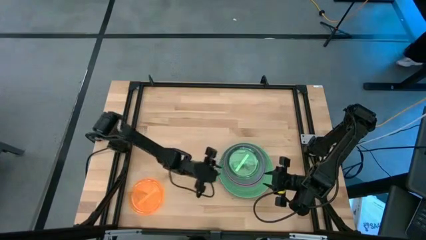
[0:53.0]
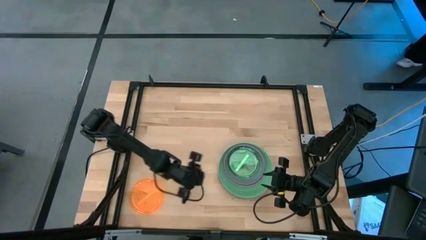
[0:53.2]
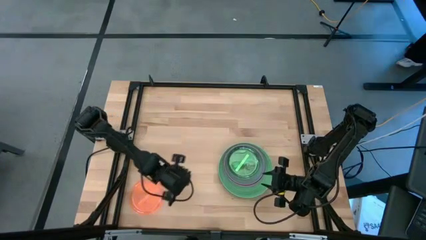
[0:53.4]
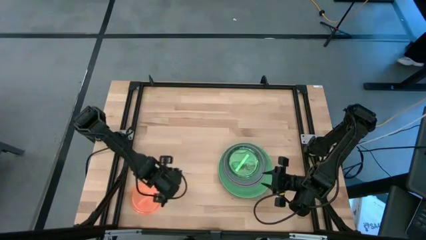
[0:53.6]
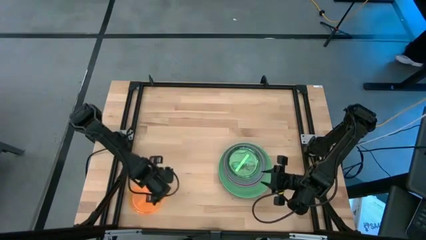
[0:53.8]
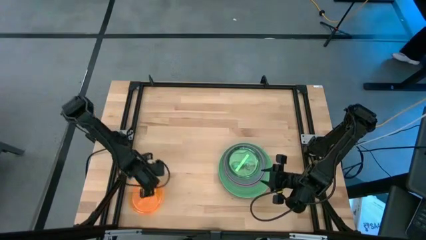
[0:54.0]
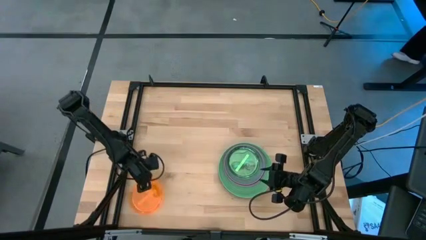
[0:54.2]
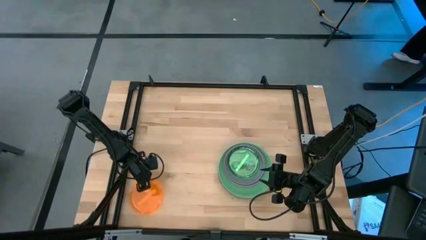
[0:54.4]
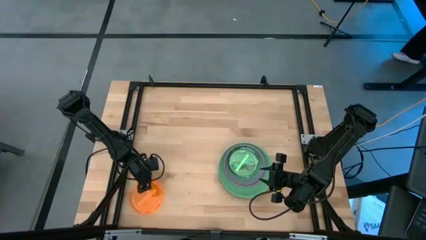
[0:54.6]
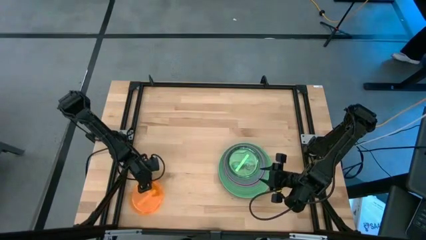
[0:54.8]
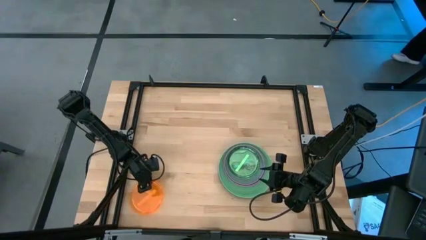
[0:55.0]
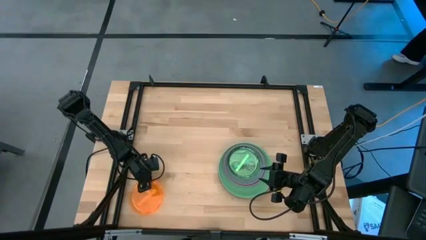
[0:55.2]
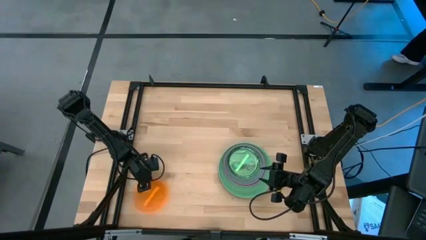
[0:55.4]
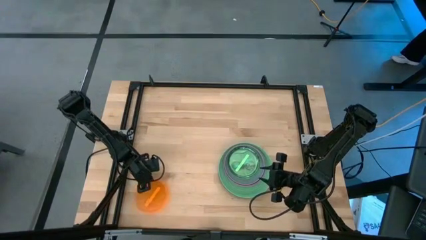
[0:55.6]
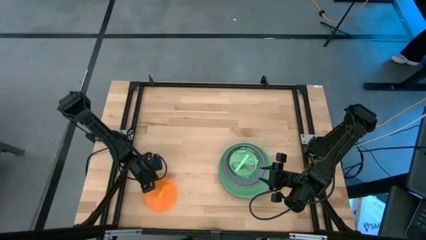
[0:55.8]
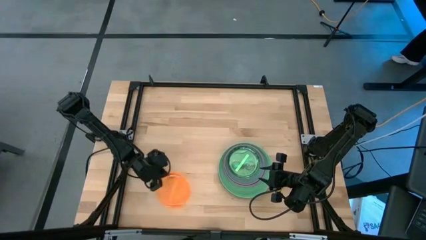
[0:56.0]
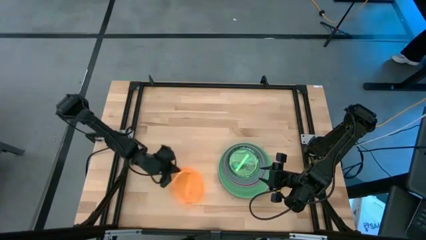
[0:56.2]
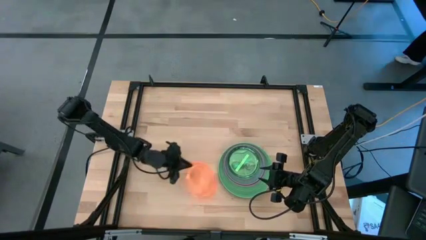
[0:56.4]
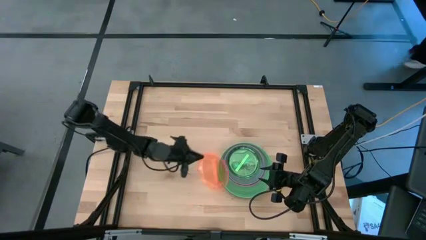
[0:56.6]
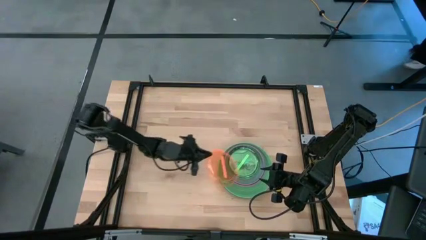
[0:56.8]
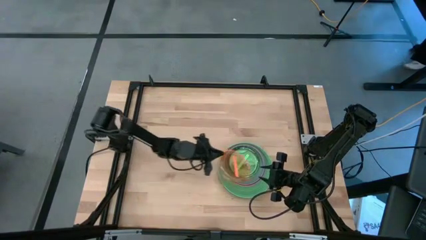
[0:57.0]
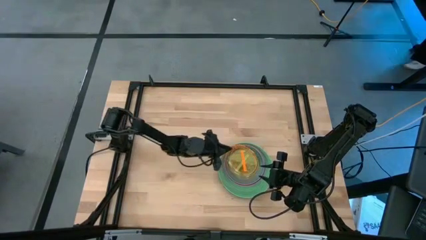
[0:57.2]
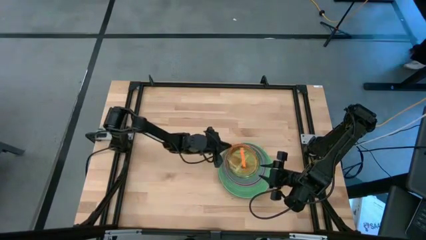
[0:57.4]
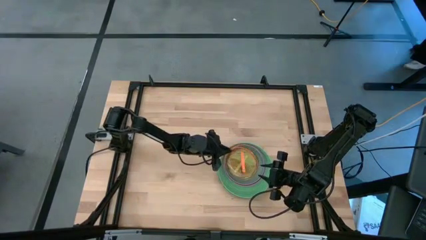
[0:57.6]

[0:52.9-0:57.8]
Task: Stack plastic plates
Stack the light orange plate on the light green plate

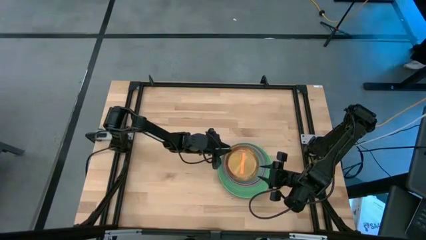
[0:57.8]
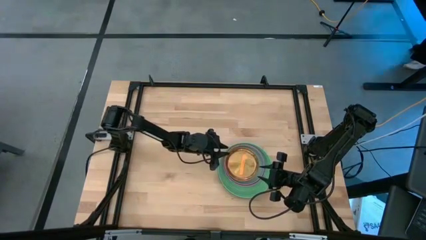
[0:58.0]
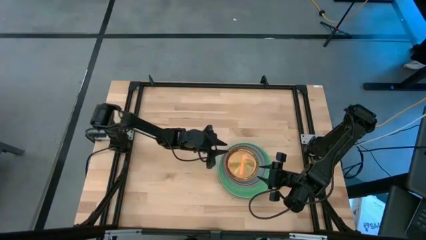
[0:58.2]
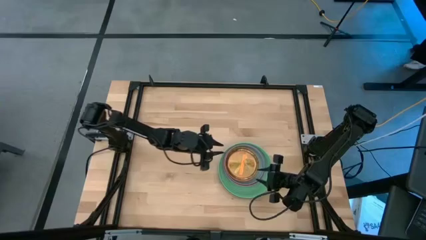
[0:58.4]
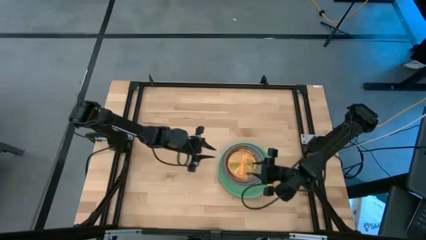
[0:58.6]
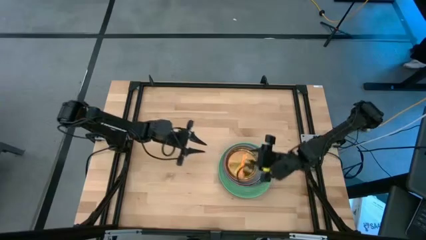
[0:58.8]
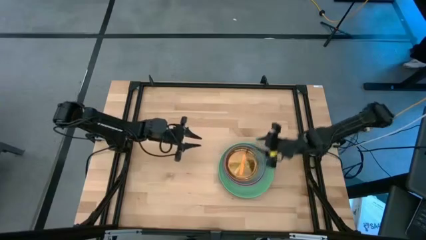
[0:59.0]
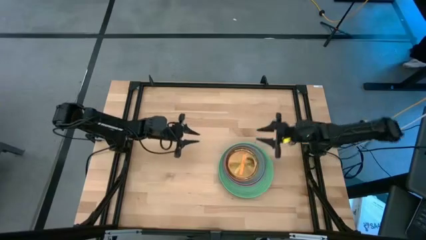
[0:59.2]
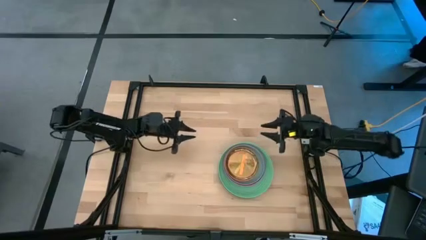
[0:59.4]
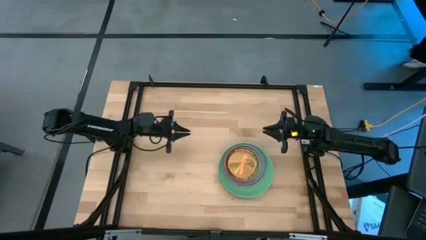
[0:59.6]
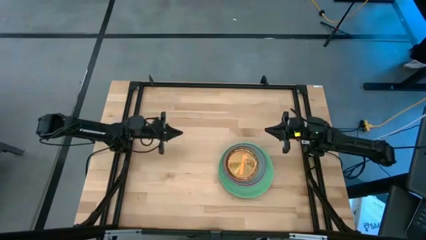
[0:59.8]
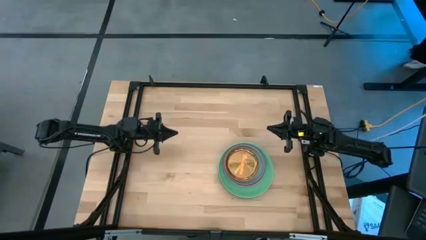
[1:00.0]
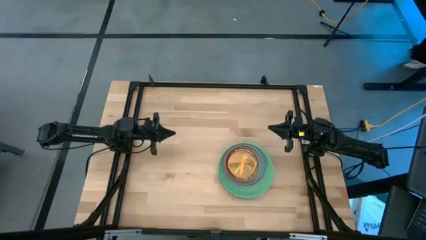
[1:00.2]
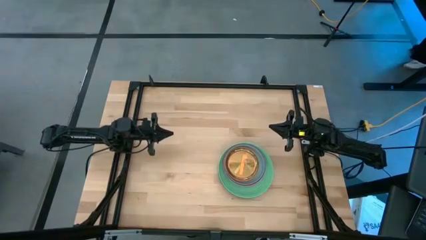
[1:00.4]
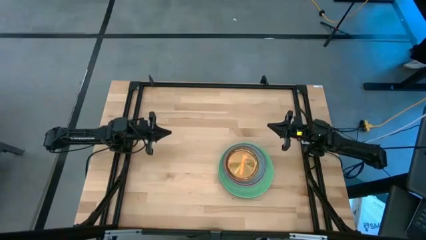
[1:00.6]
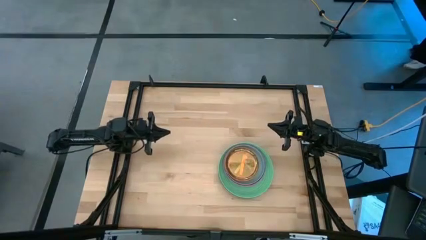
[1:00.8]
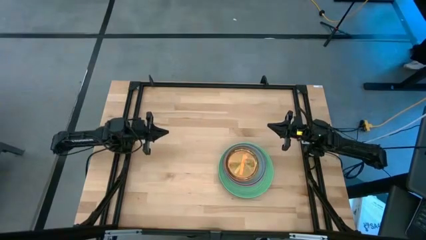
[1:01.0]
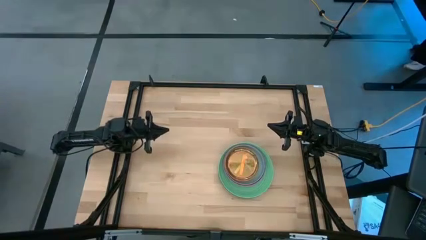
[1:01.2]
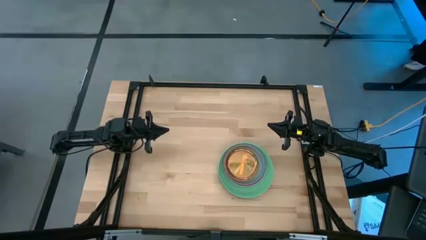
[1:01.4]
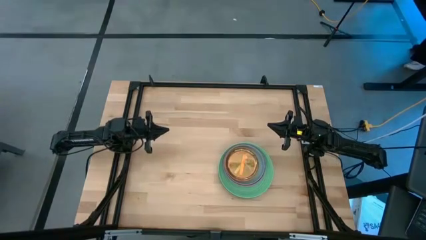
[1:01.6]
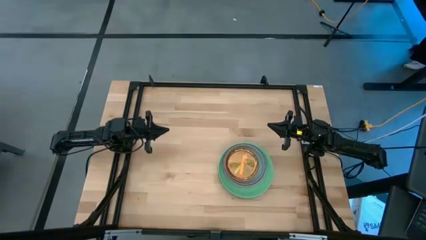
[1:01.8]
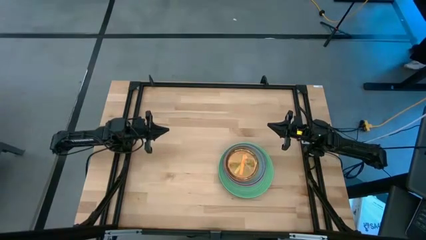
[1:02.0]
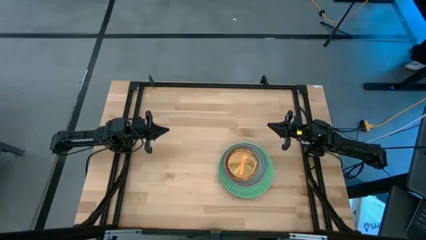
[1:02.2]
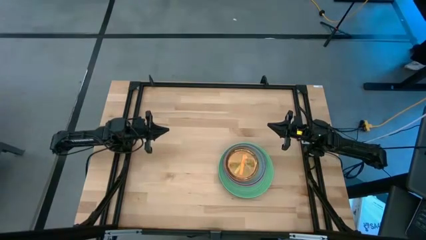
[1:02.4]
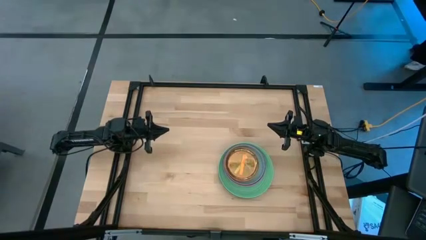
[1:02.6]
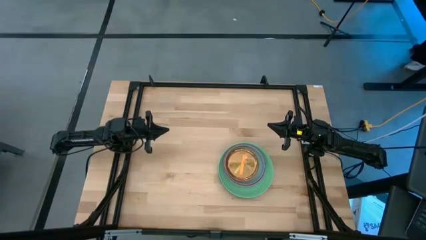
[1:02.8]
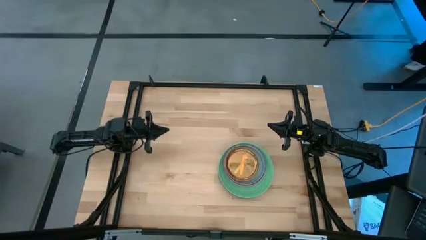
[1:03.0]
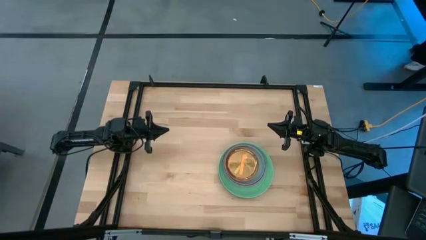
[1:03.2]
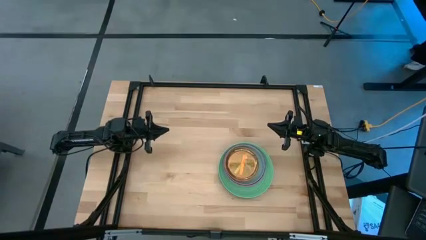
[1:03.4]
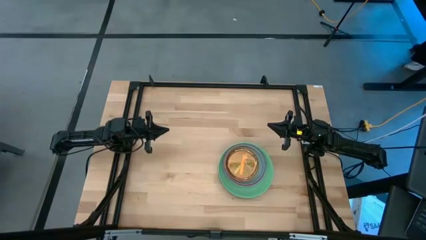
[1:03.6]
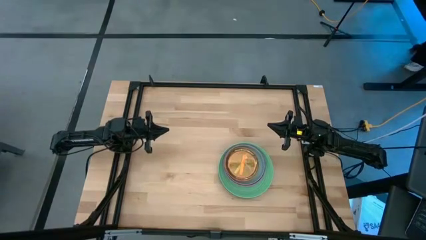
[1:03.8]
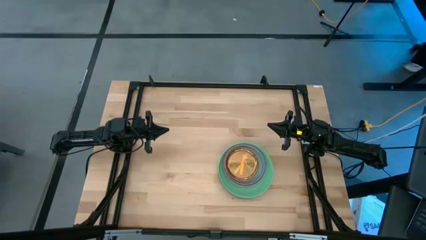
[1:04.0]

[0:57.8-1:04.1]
Return to Home Position

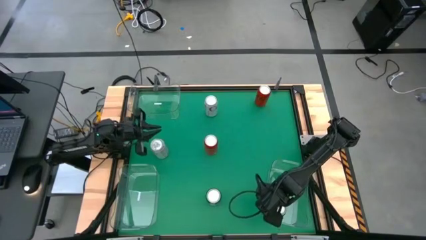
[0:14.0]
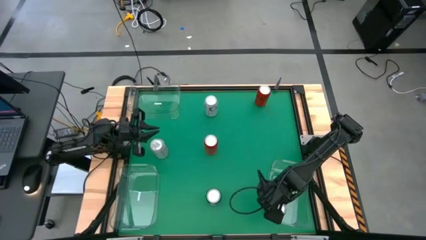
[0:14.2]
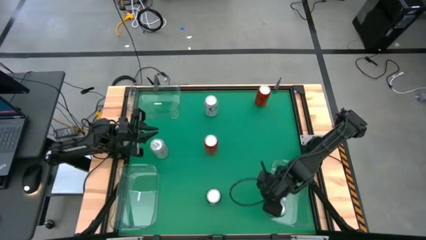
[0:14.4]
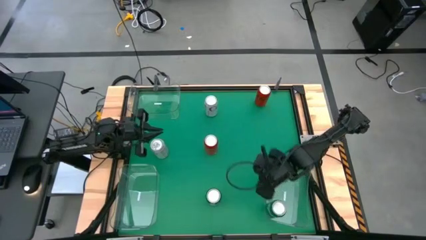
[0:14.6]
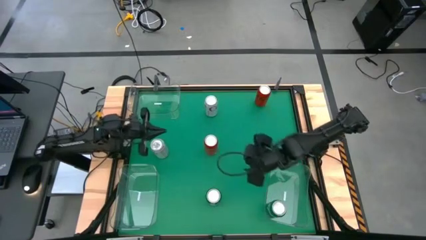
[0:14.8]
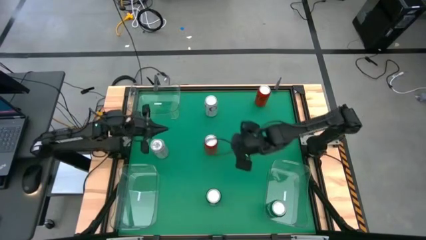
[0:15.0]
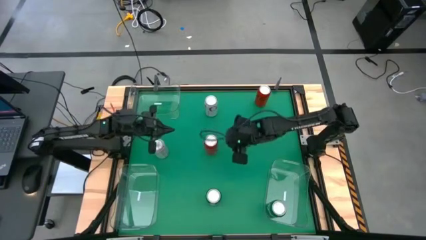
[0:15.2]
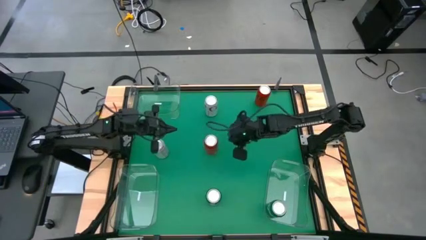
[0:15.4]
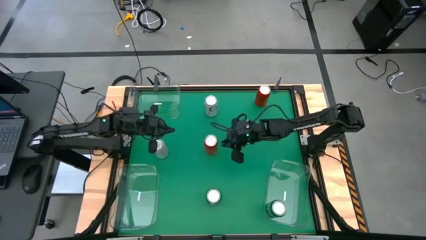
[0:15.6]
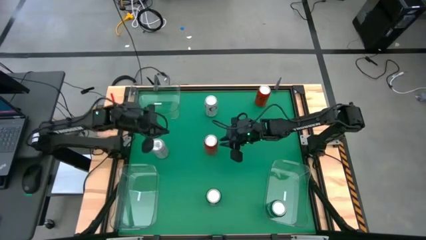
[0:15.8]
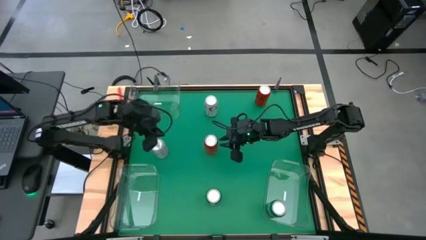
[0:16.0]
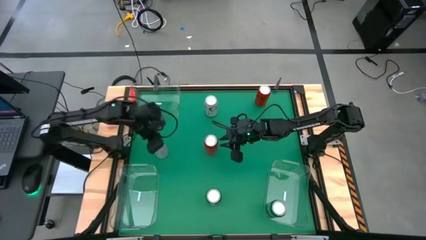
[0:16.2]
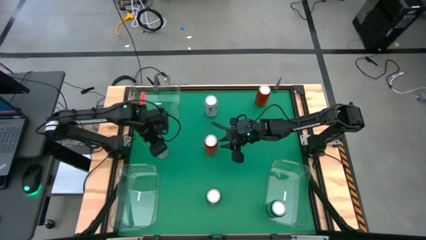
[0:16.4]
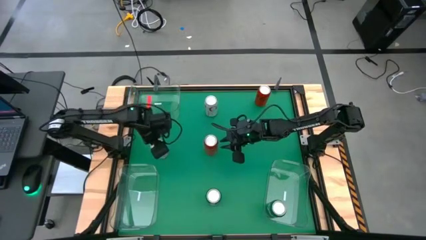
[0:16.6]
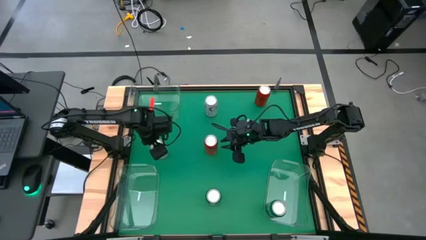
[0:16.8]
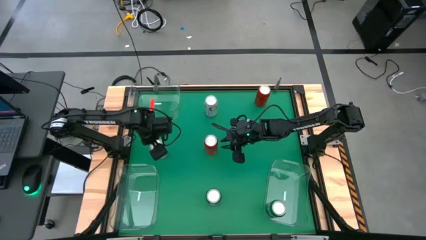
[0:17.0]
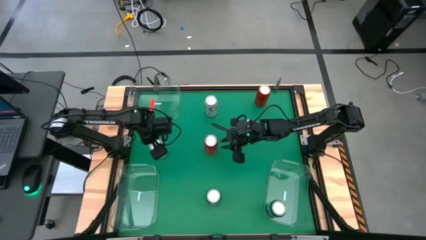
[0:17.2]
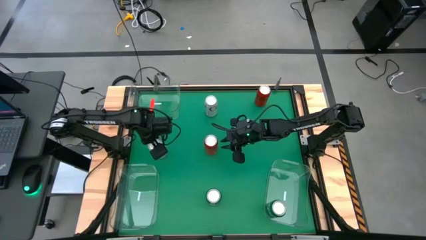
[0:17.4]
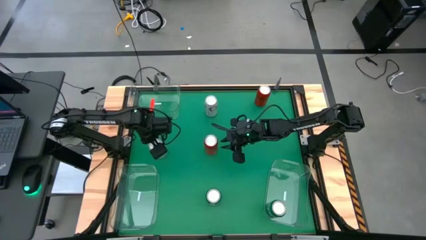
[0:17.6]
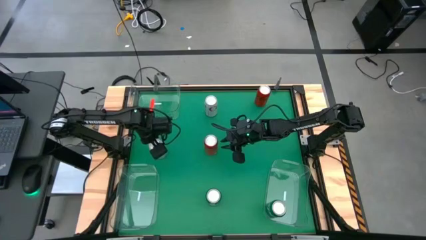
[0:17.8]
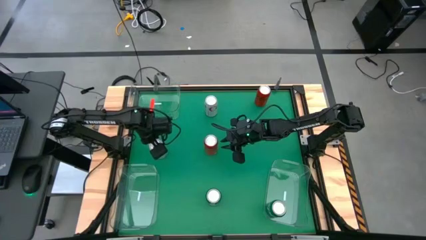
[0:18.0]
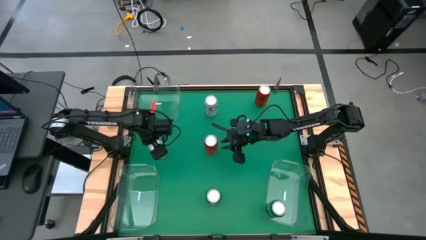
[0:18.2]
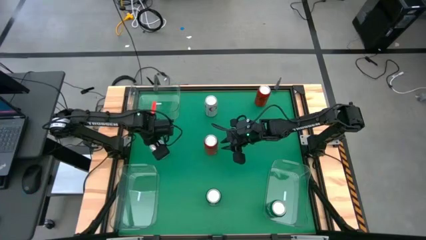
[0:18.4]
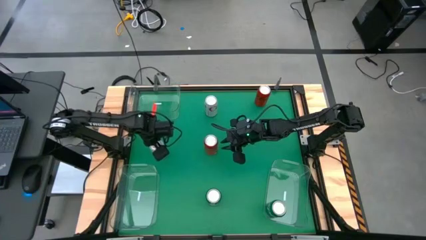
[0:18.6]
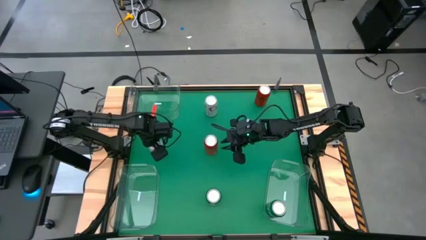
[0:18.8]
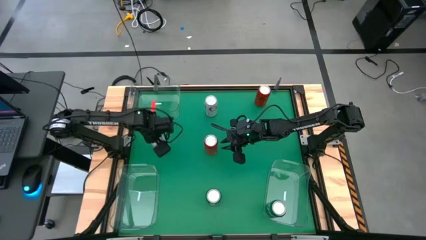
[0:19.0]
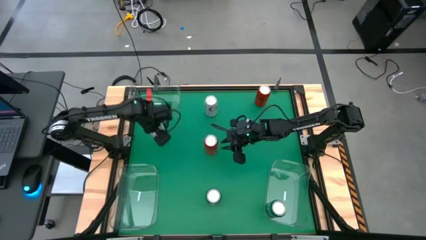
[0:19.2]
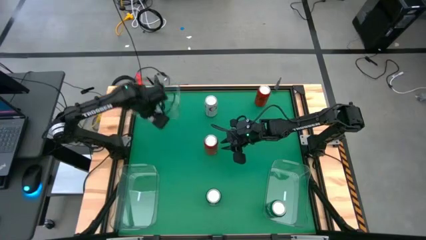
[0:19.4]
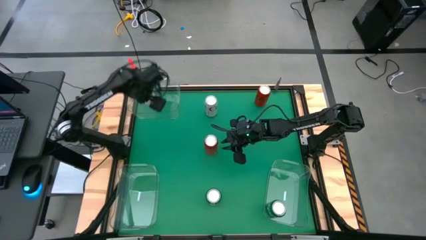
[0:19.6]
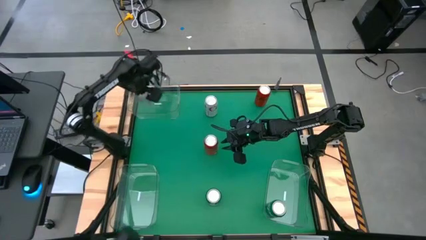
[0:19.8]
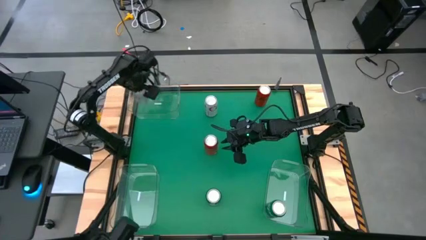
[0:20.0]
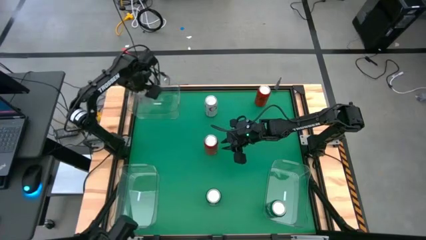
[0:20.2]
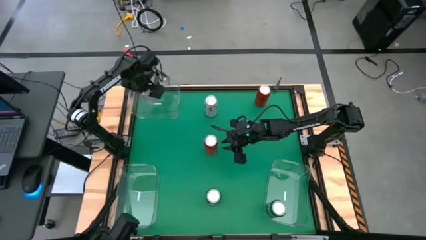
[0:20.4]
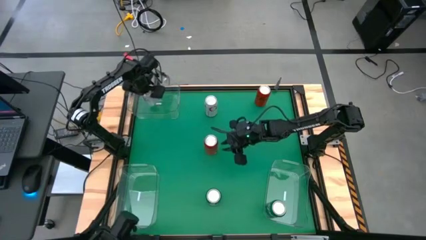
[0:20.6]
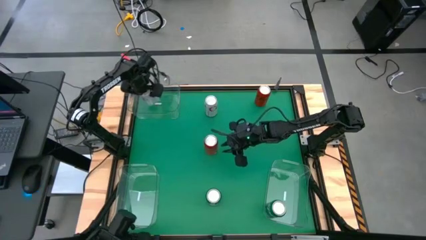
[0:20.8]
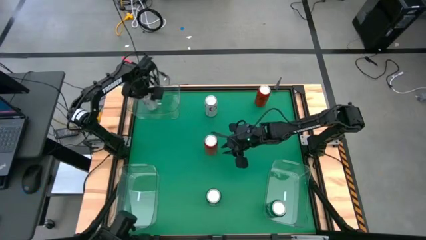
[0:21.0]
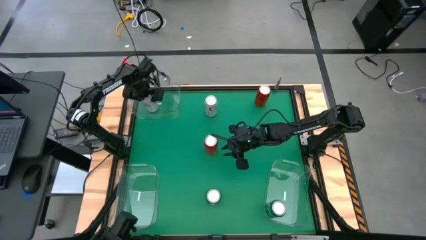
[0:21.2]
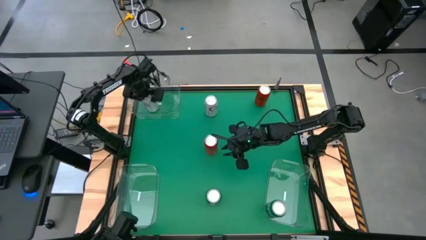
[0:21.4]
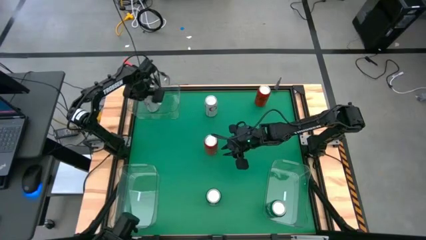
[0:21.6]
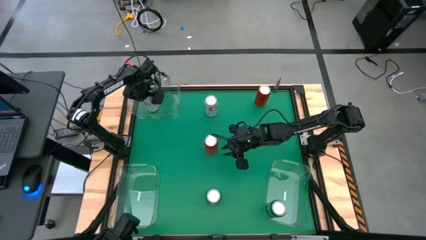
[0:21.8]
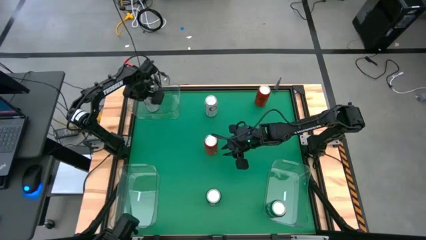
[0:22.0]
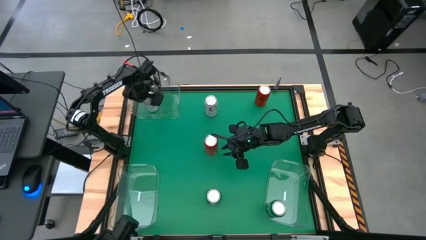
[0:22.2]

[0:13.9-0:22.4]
Task: Sort soda cans
Put the left red-silver soda can into the top transparent bin
